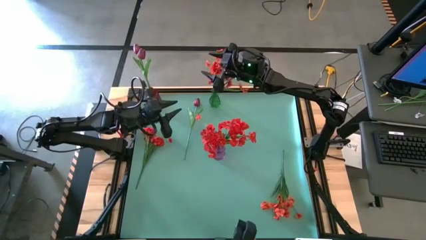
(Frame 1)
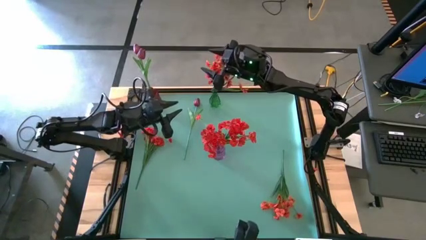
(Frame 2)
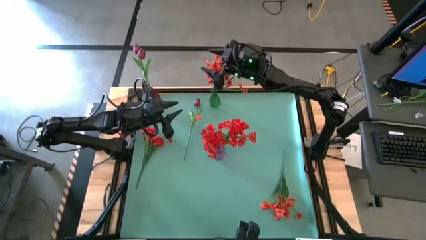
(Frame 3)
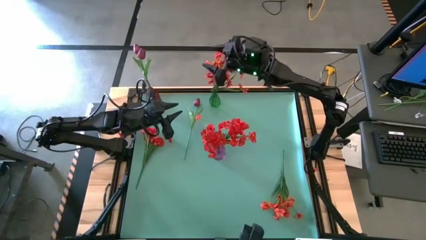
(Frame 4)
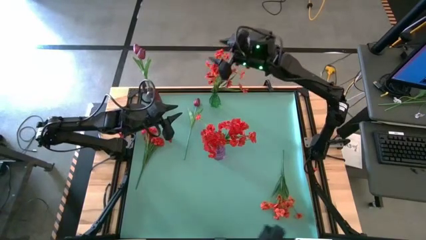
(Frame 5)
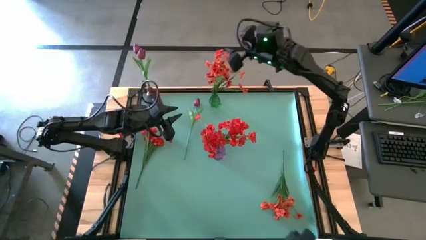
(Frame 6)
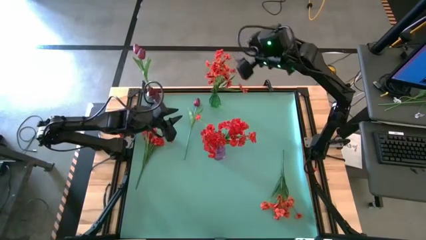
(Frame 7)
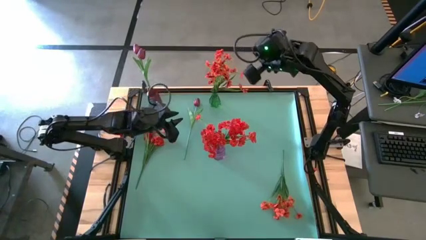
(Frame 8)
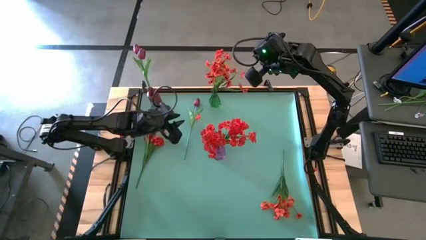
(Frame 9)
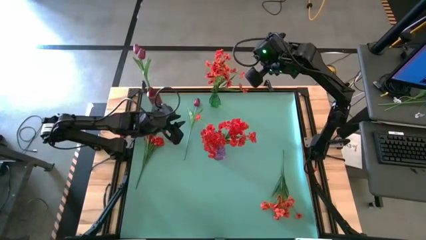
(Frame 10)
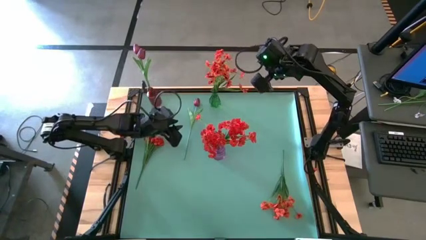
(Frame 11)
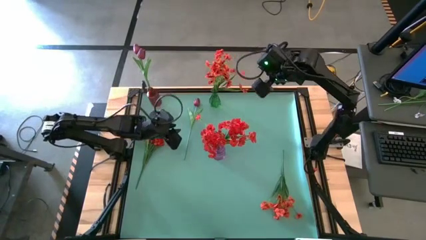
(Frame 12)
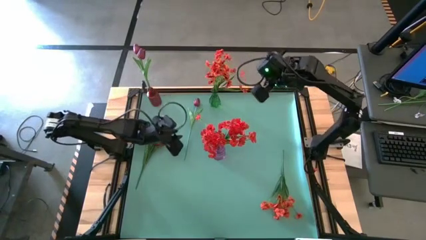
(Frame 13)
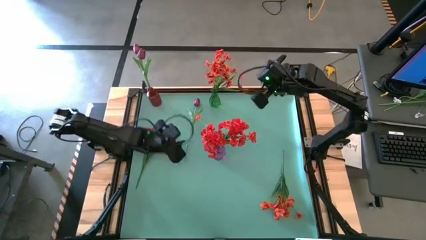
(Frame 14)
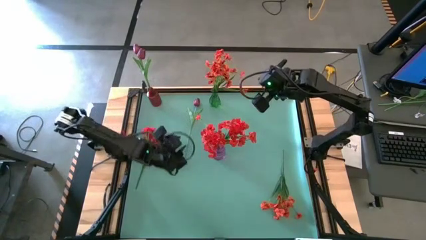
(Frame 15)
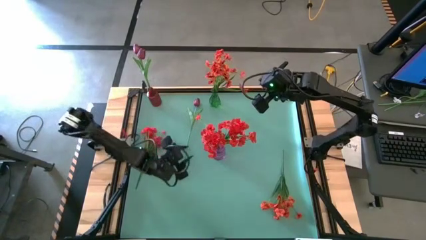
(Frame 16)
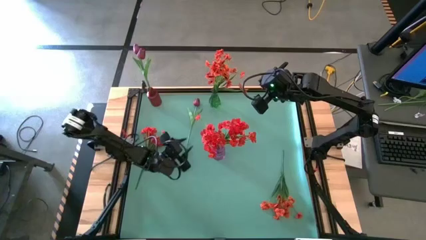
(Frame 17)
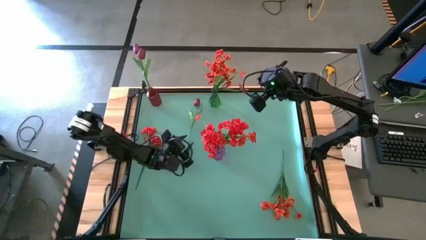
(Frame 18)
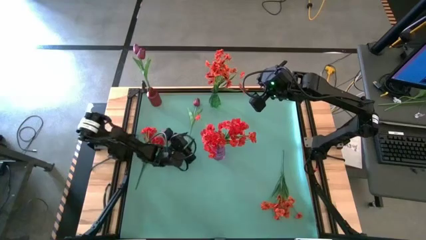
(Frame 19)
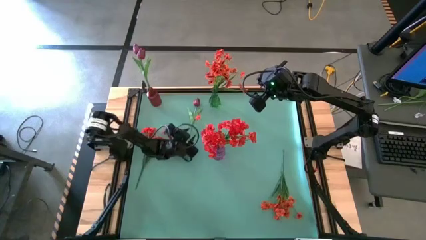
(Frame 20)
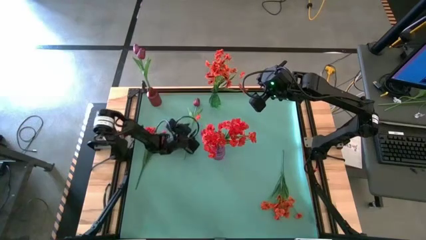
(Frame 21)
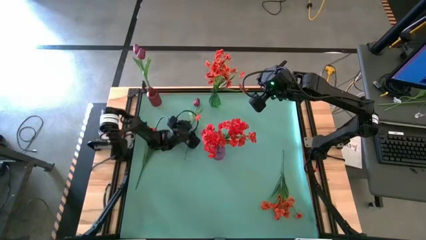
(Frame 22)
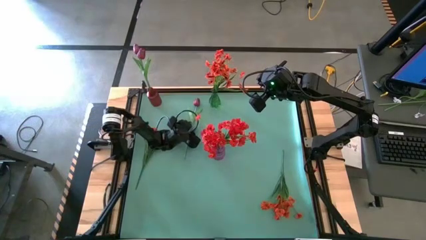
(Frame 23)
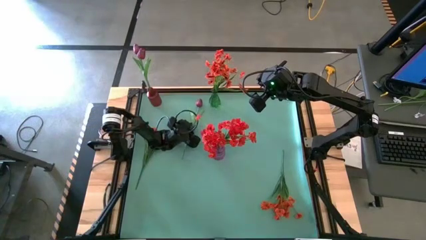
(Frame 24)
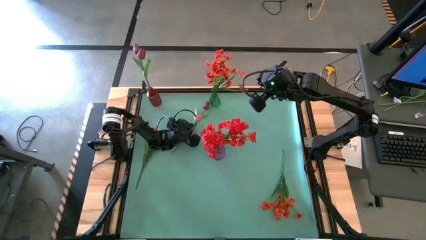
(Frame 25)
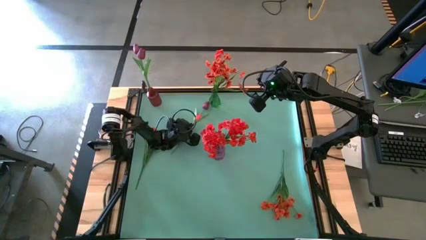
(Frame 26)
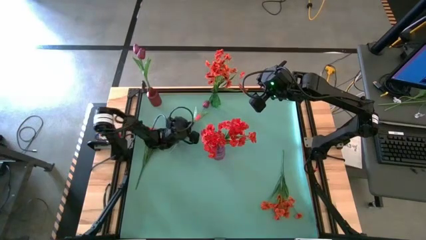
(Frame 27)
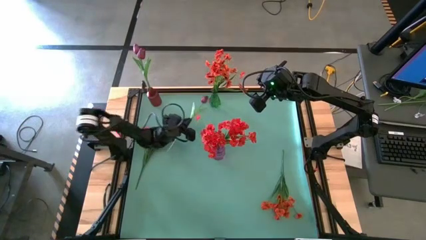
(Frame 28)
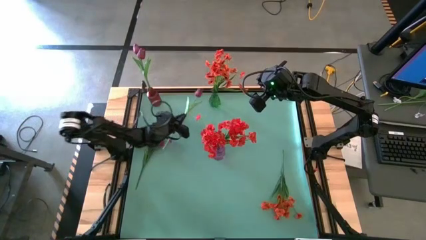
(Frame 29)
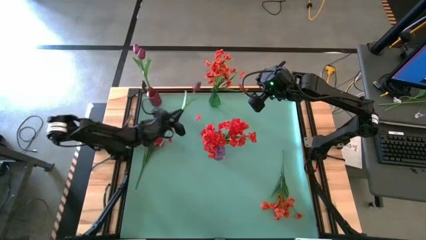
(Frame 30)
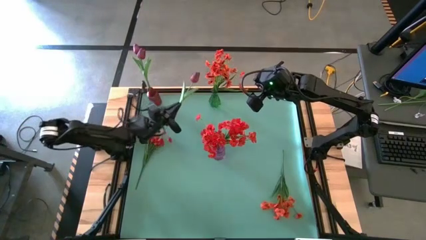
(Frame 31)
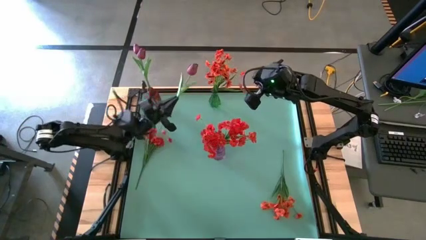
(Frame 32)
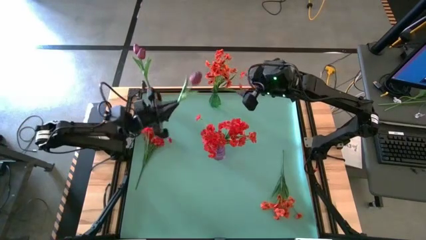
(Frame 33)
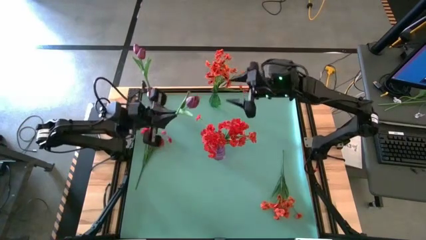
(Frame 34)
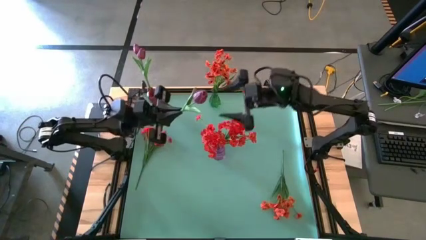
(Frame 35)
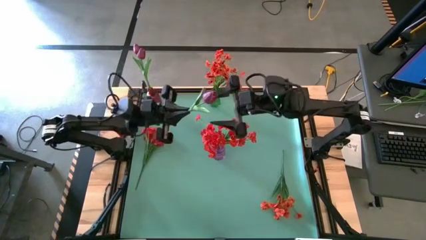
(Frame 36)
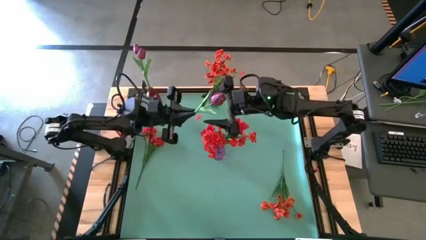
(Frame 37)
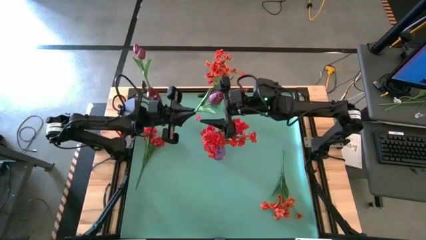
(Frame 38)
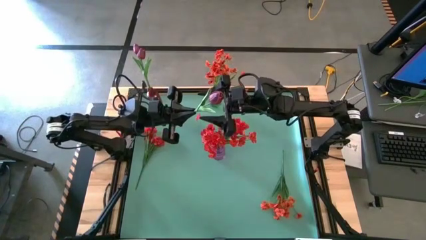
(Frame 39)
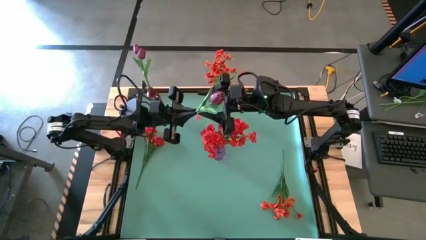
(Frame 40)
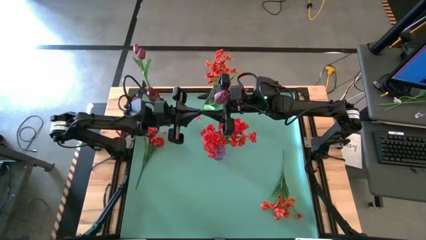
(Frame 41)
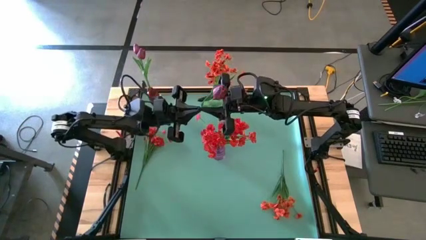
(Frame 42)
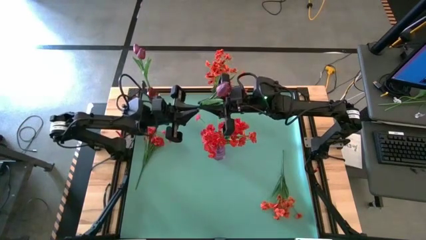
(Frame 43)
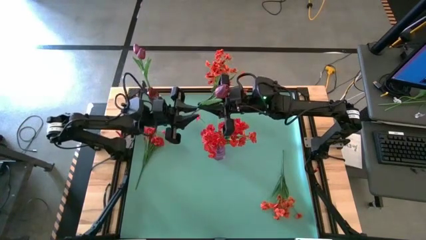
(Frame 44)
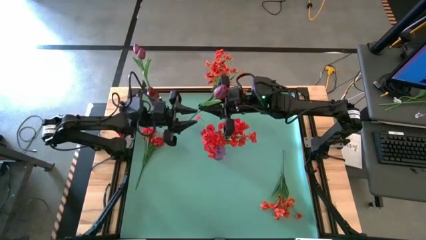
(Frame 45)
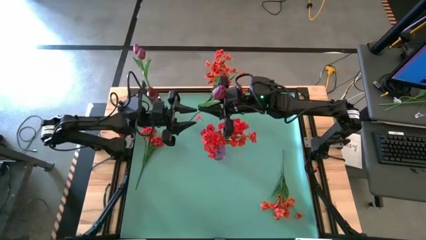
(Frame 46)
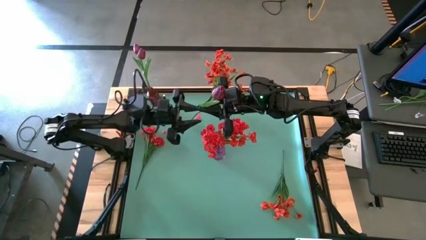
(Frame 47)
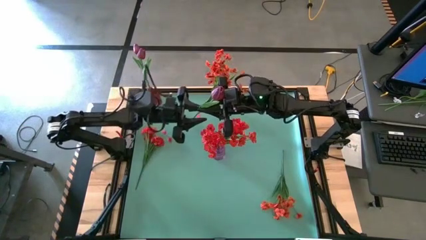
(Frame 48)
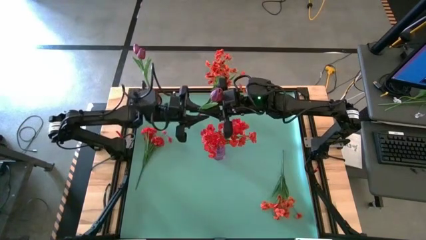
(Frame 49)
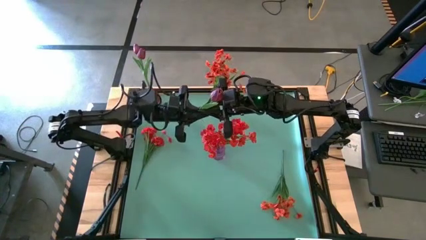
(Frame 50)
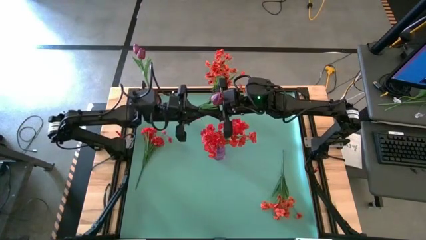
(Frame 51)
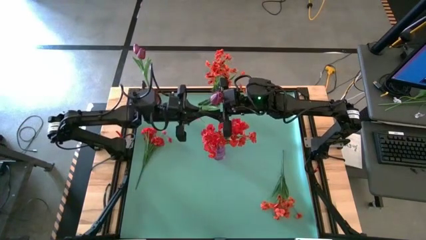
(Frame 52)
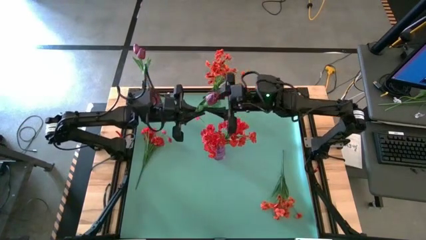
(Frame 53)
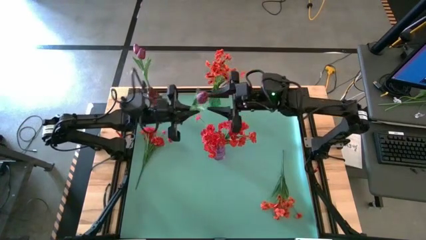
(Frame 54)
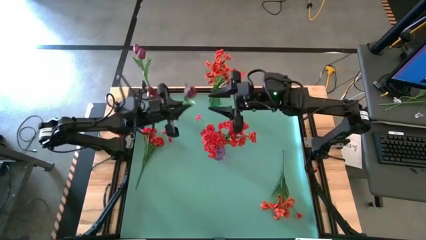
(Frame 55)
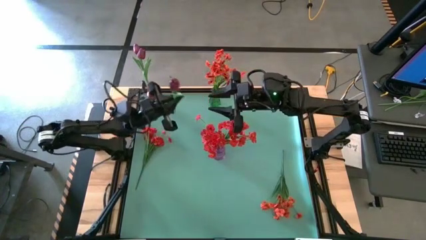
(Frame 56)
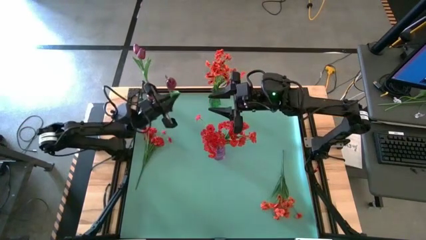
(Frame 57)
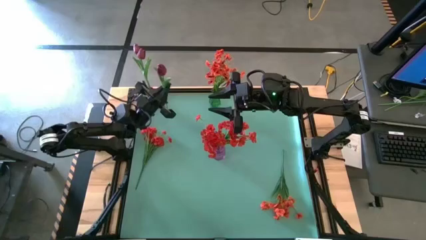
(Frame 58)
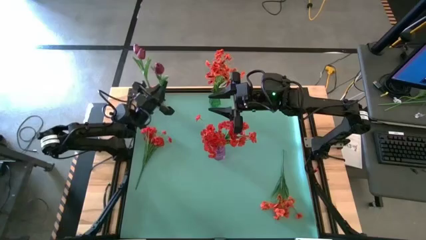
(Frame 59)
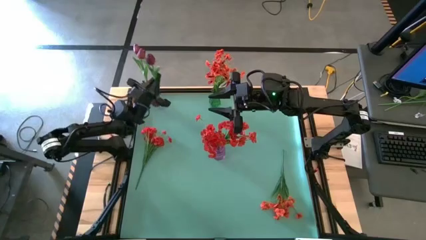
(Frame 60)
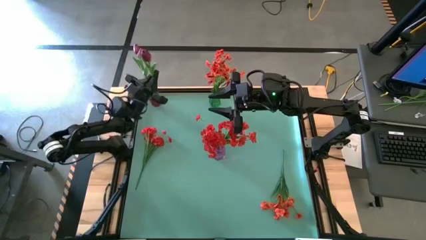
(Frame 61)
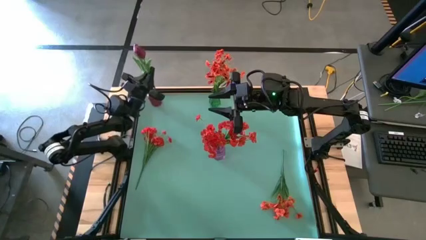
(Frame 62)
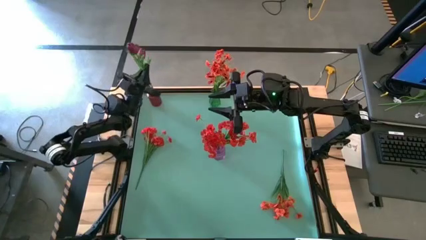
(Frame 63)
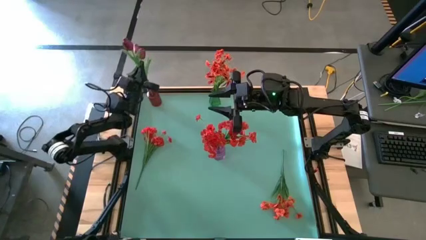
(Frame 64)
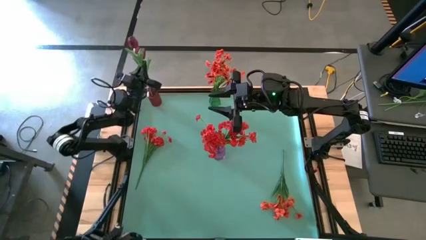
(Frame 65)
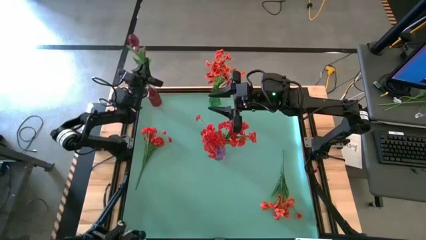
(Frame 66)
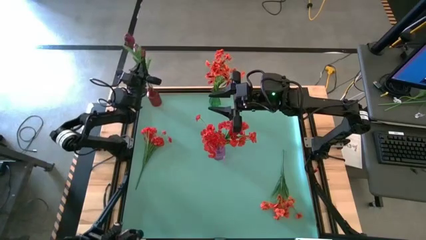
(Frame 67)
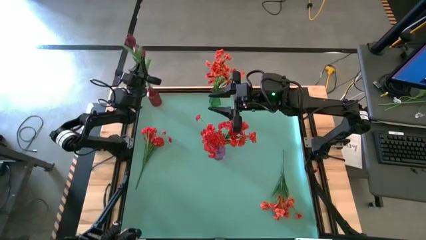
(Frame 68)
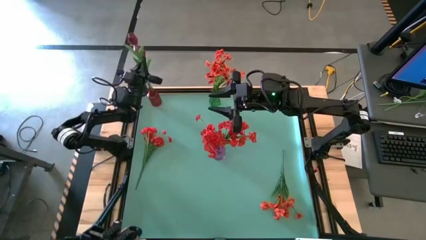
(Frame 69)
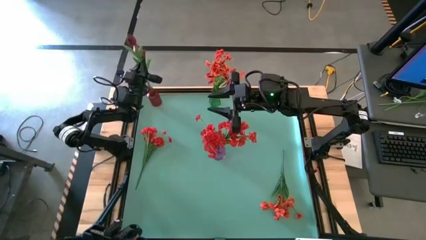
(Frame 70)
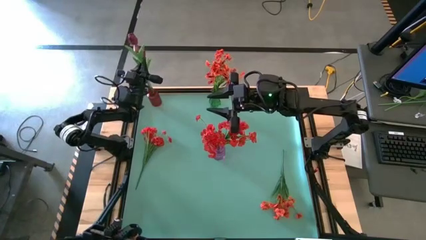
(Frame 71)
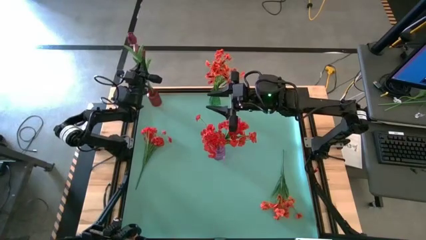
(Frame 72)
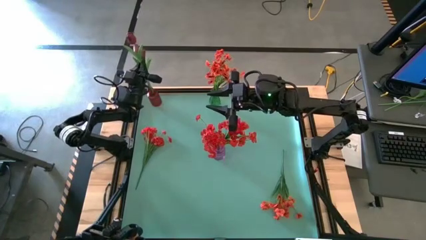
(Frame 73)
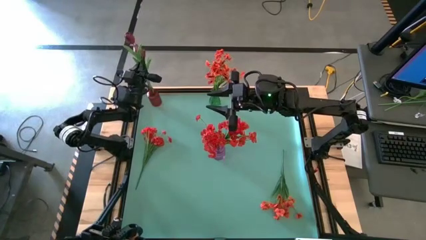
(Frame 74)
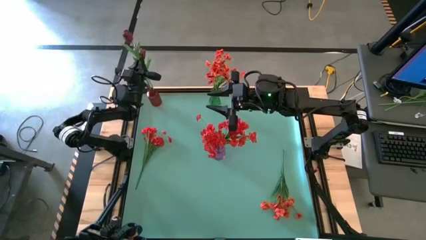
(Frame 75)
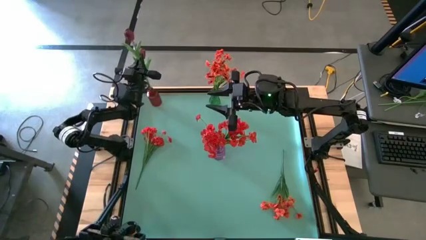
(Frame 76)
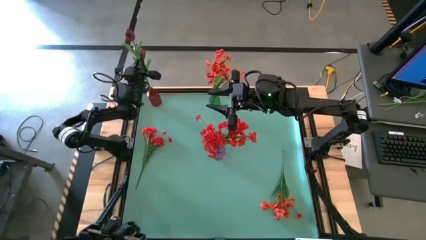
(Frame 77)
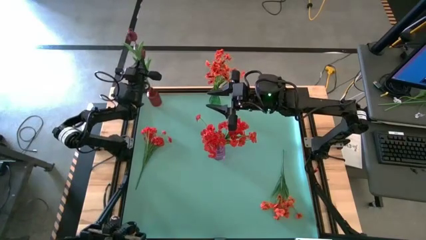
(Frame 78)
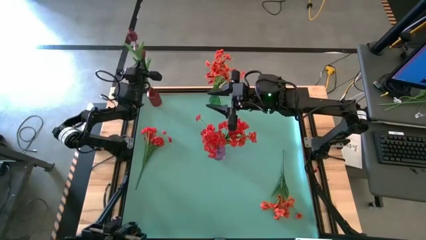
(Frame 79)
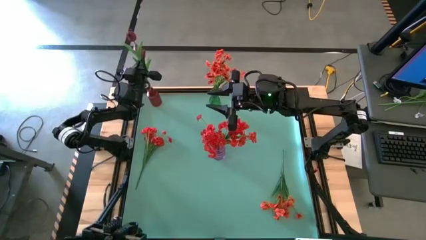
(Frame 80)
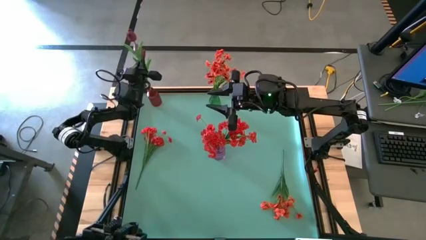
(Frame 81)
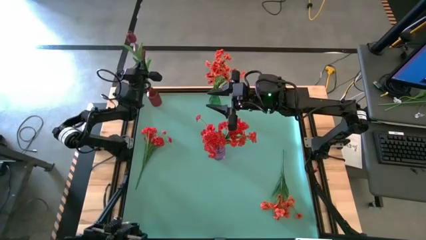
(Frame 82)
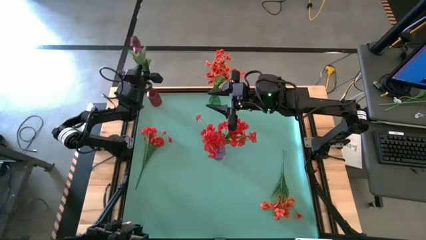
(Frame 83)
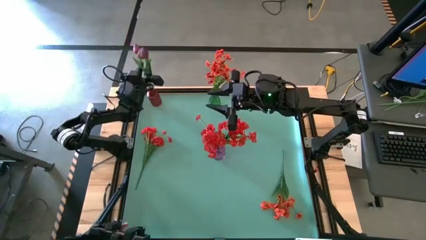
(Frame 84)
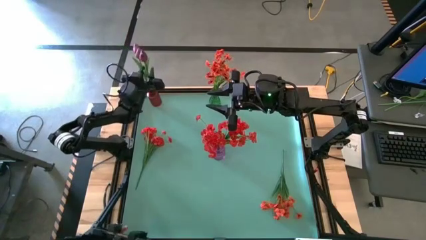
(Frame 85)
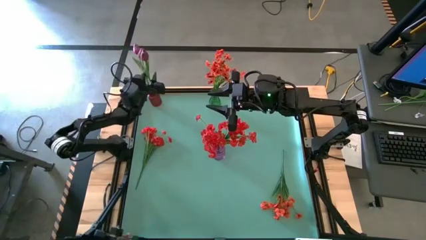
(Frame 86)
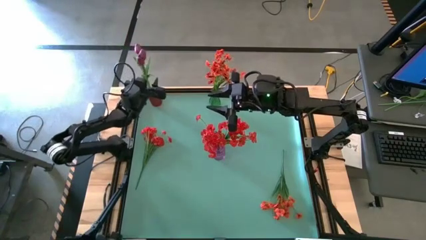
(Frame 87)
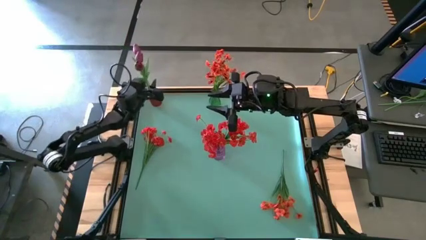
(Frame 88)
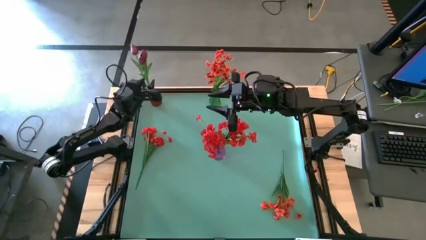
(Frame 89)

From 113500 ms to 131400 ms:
Task: Sort flowers into vase by color
Put the pink flower into the red vase
